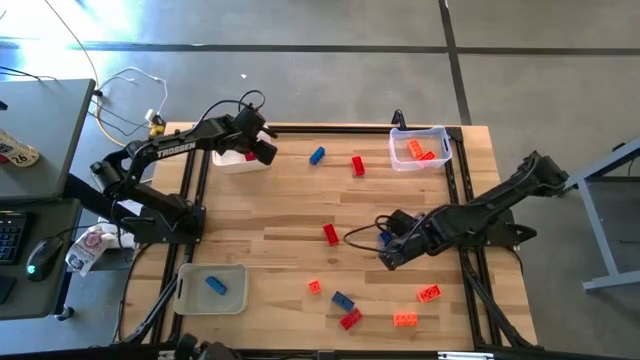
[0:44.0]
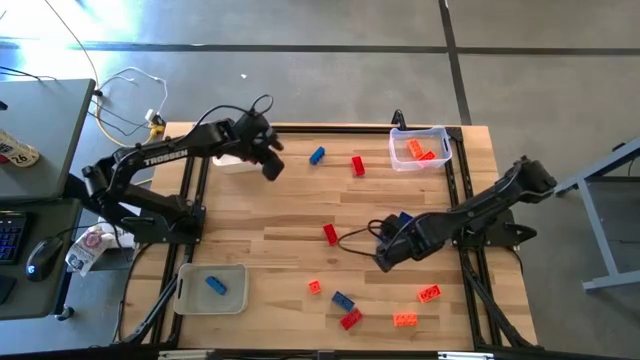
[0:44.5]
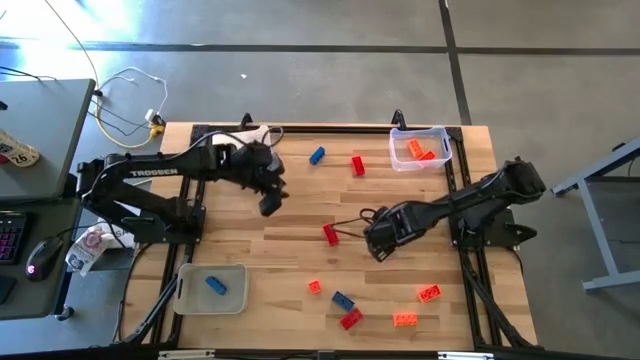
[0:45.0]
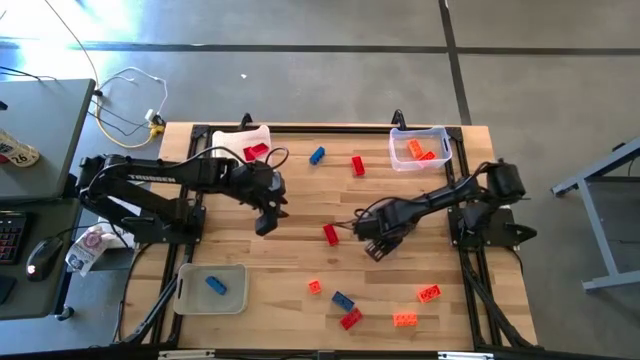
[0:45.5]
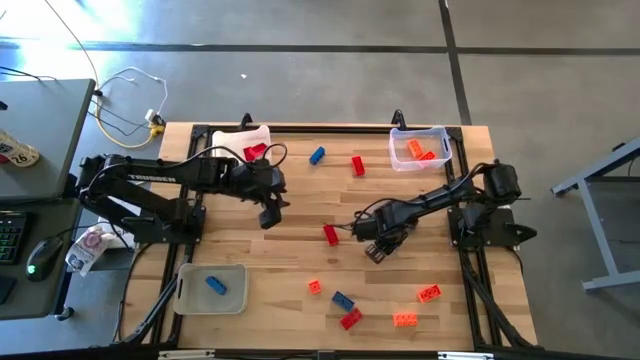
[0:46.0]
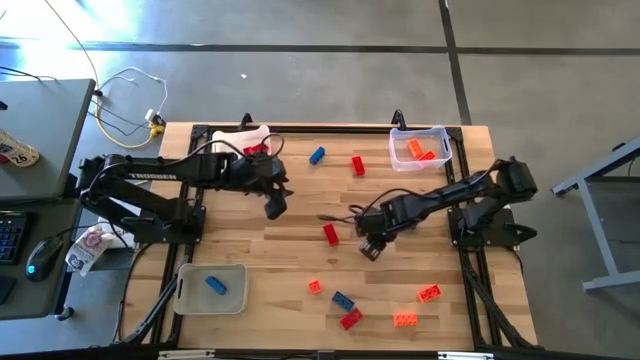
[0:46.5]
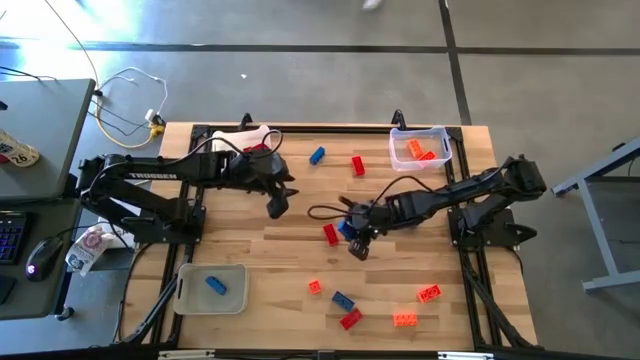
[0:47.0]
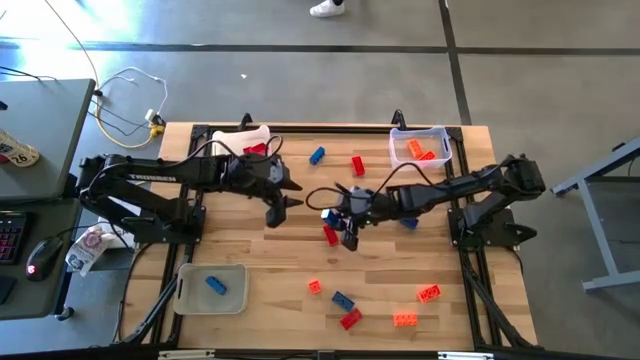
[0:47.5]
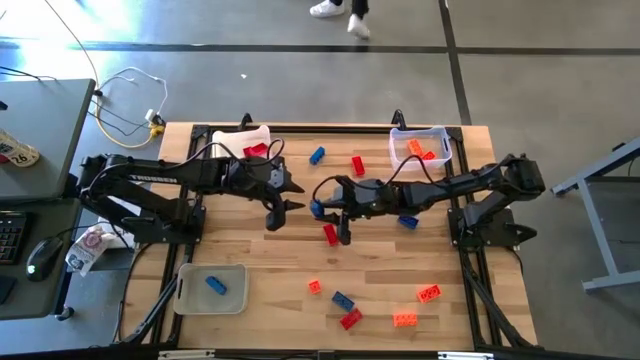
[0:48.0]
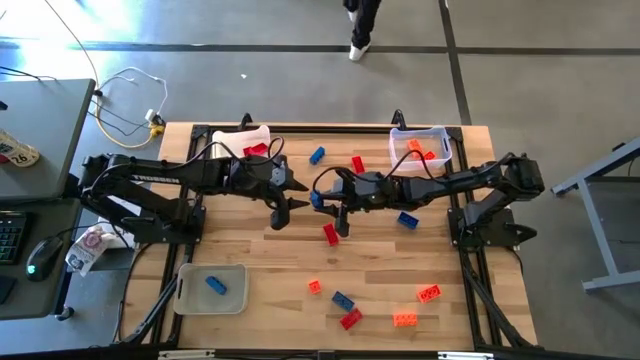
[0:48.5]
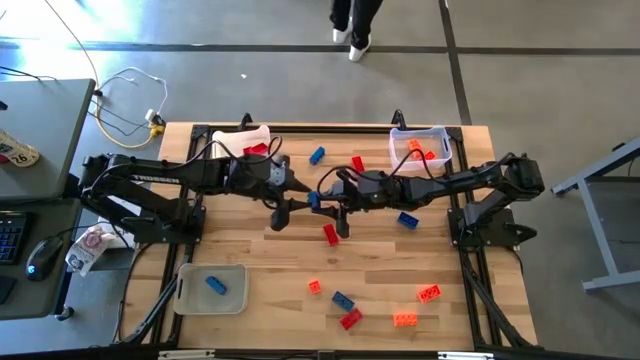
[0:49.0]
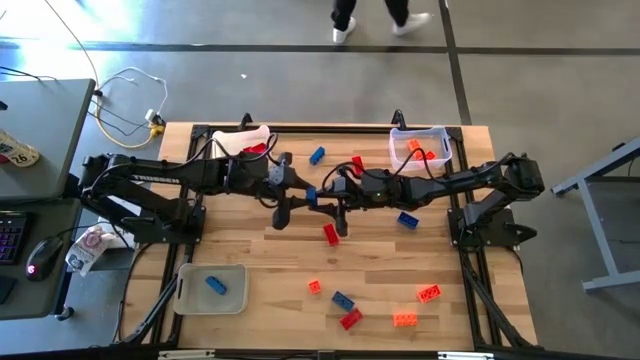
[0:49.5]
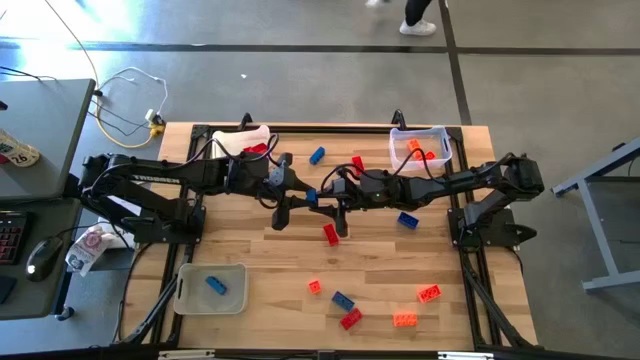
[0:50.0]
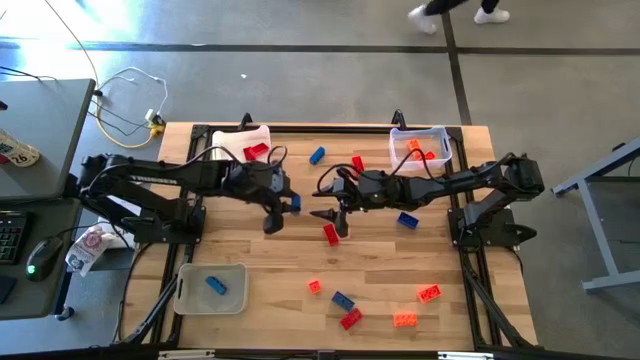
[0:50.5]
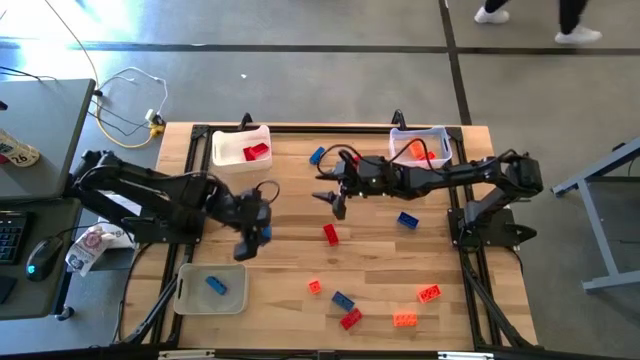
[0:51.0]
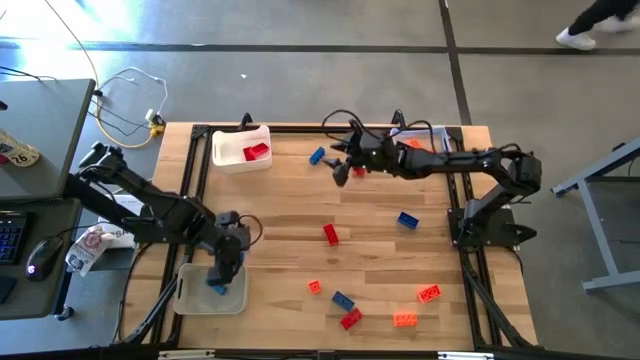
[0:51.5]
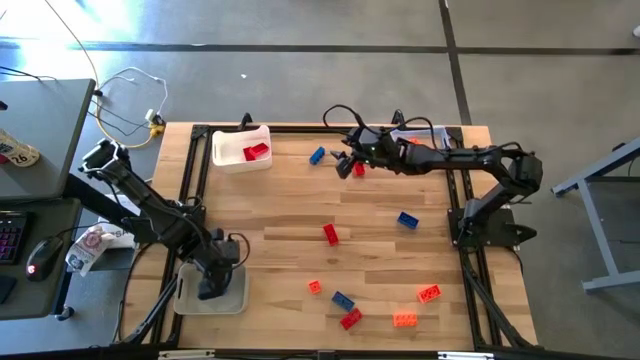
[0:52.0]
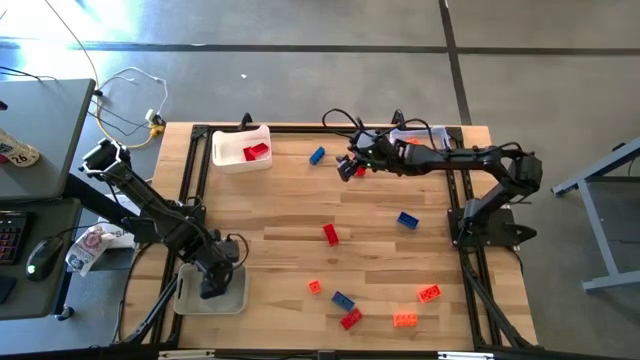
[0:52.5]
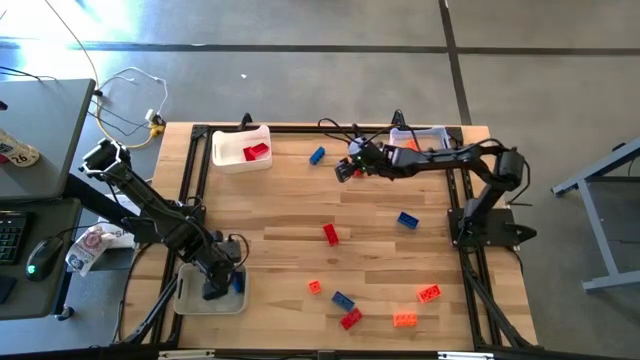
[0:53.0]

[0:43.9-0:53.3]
Task: Sort & place blocks by color
Put the blue game piece into the gray bin

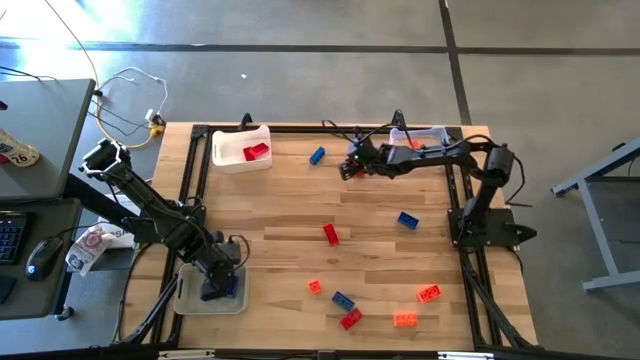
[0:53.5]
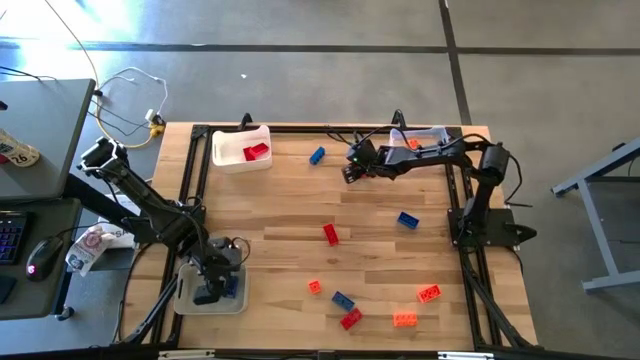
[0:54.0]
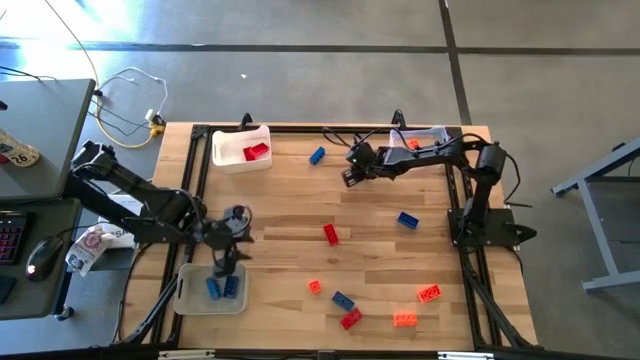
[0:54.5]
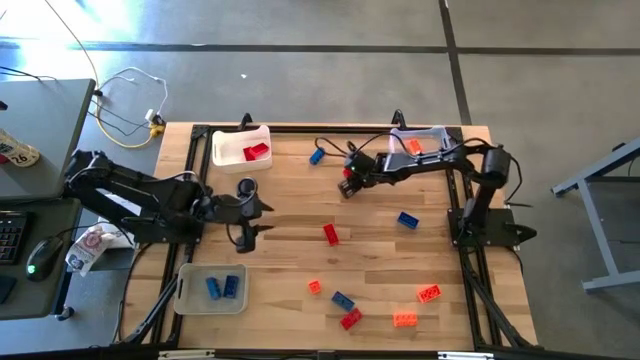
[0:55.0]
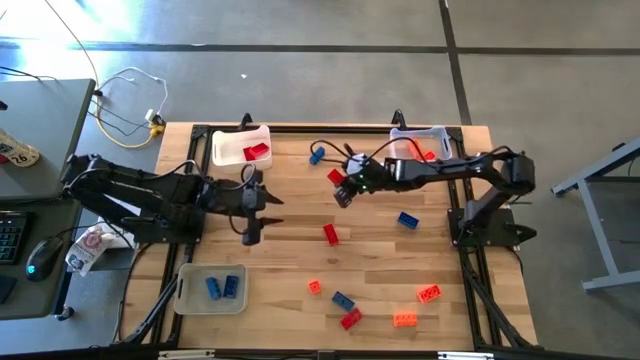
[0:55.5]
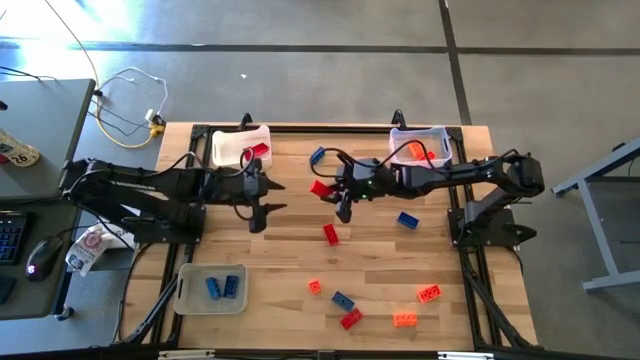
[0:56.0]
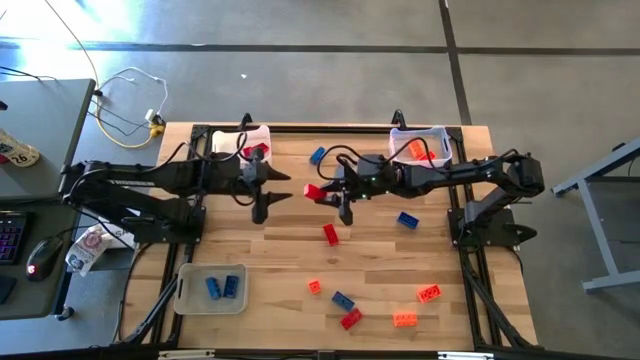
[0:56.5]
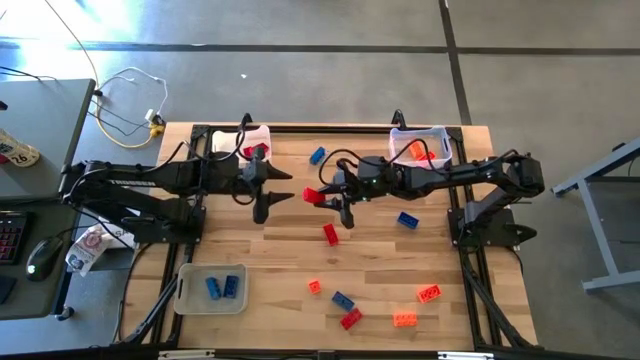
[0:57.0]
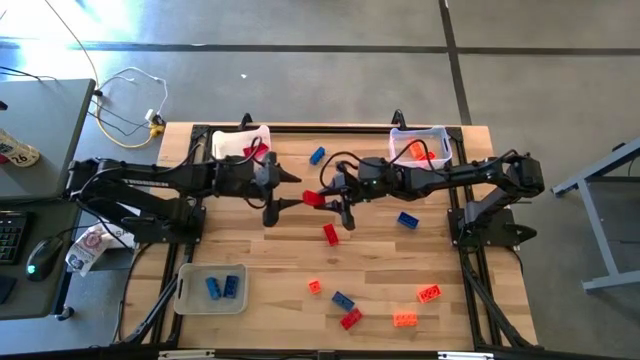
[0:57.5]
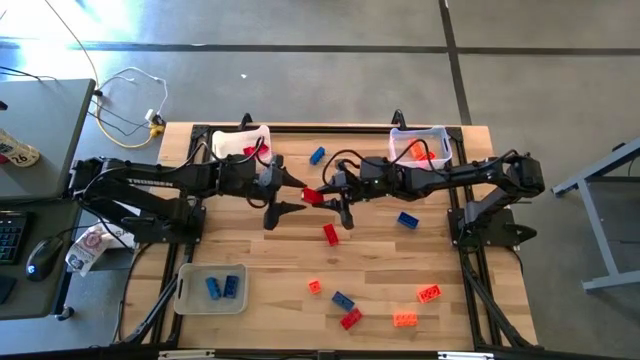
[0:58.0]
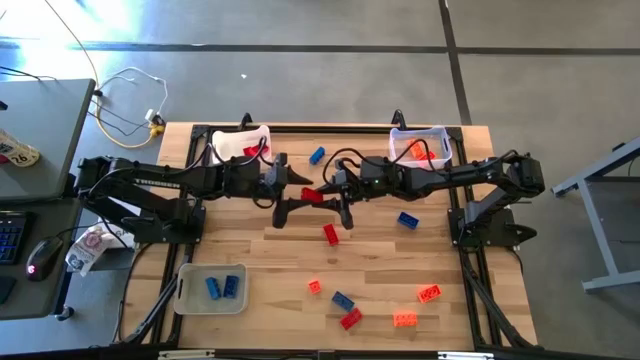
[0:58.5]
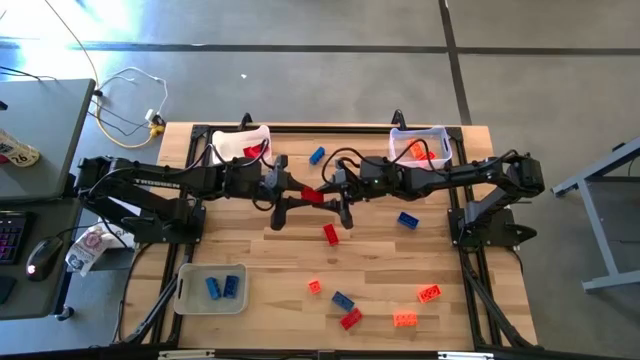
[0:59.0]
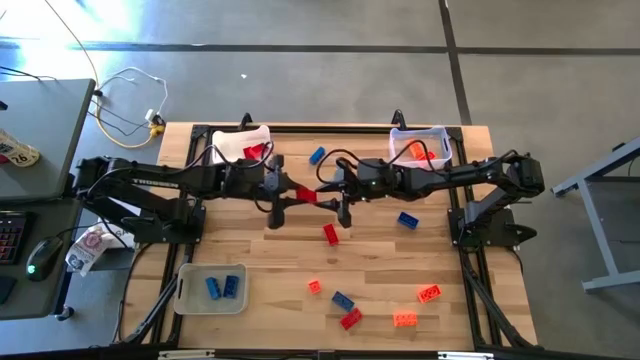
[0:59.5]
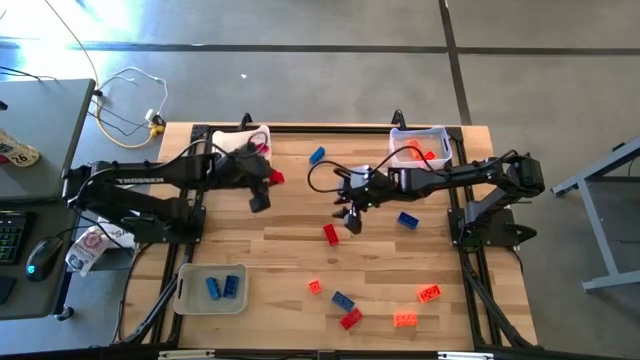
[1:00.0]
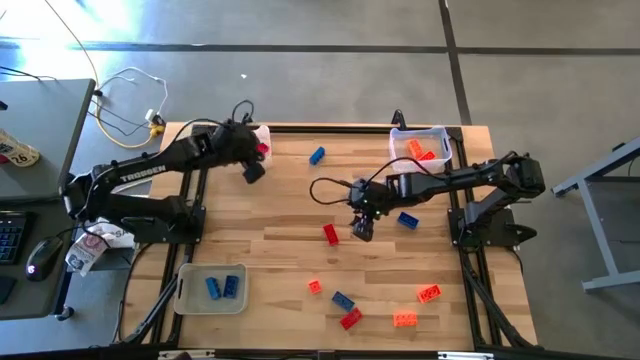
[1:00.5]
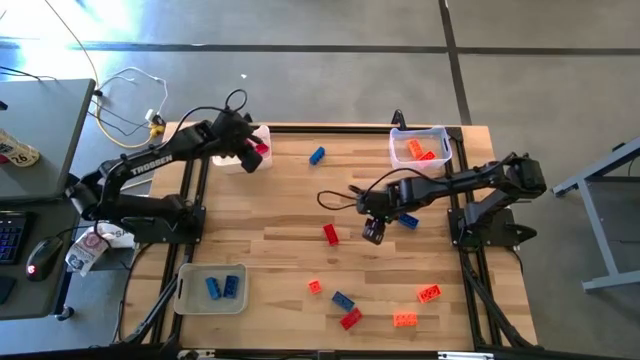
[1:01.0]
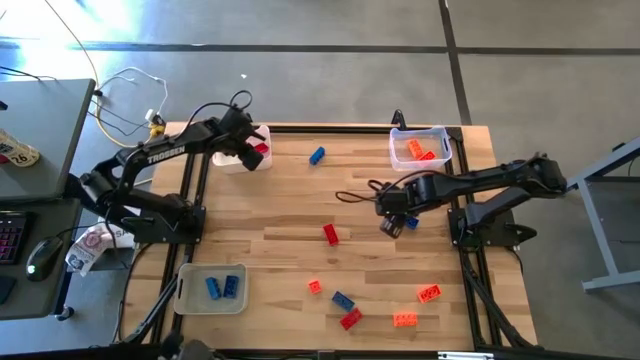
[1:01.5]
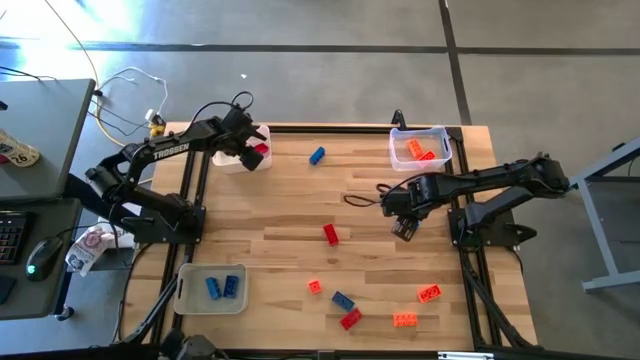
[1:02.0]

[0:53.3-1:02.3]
Put the red game piece into the white bin

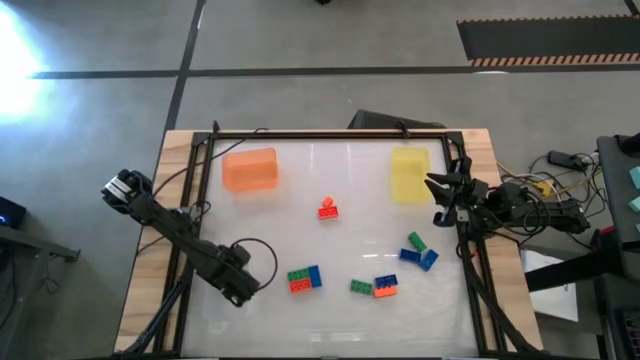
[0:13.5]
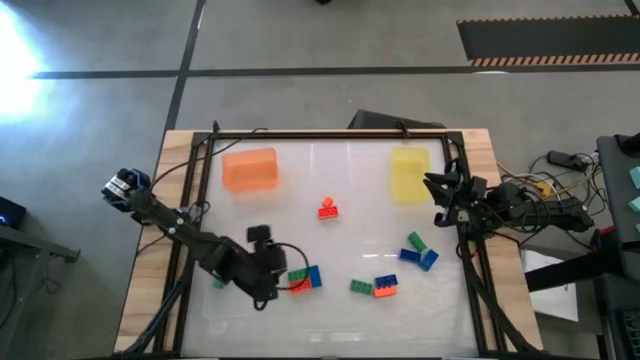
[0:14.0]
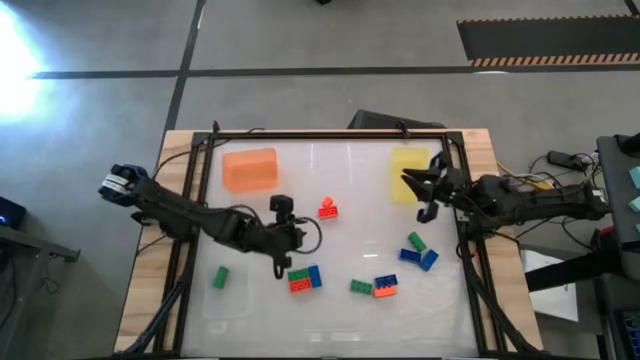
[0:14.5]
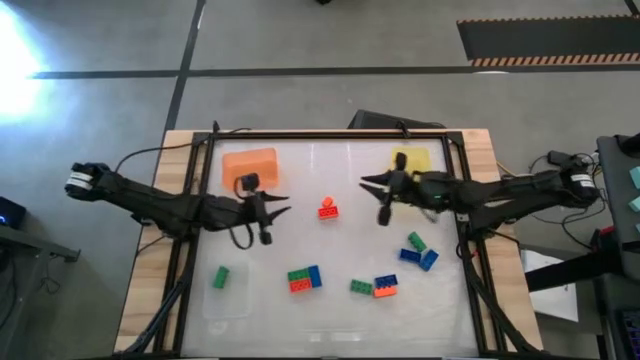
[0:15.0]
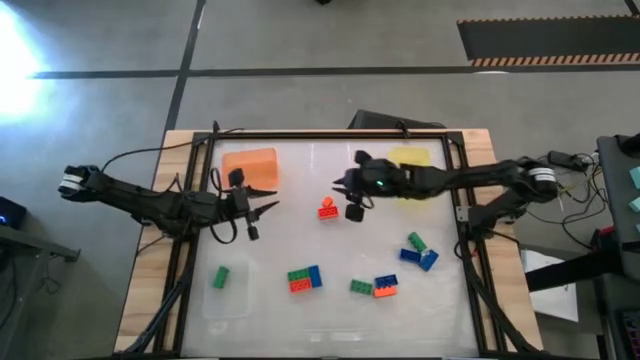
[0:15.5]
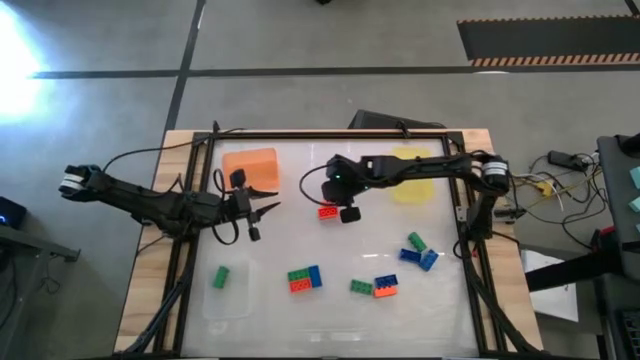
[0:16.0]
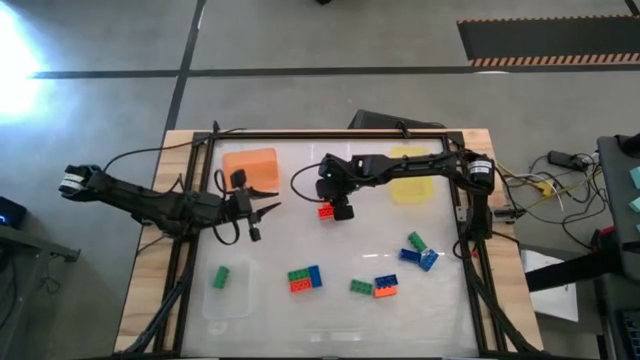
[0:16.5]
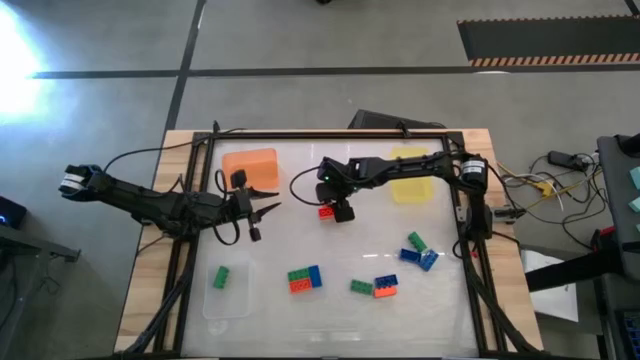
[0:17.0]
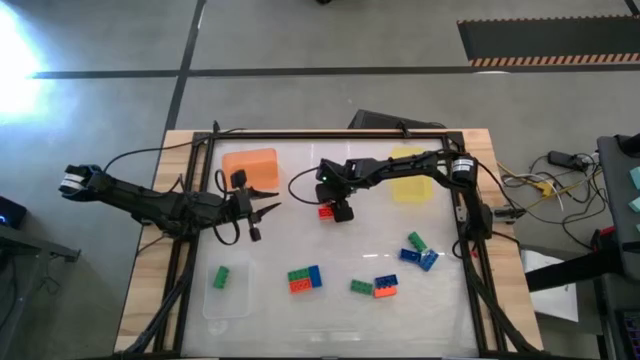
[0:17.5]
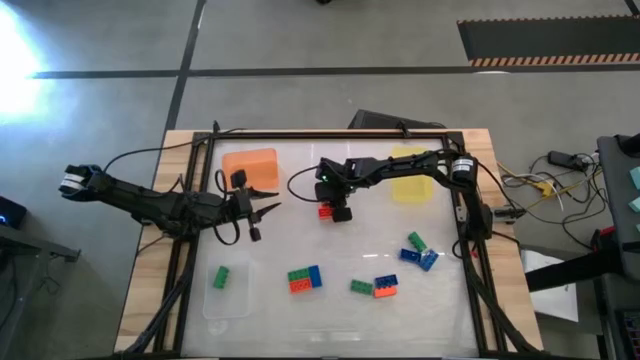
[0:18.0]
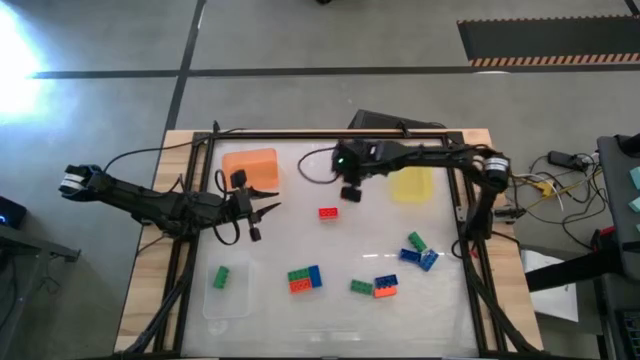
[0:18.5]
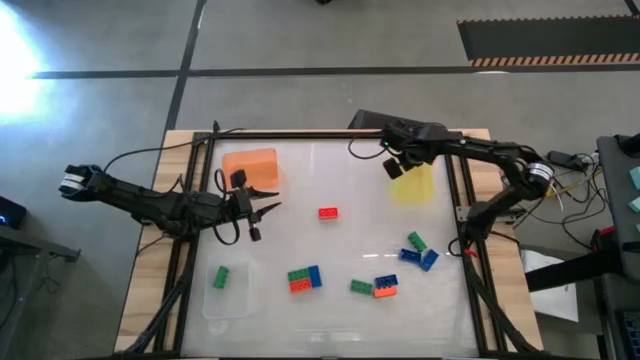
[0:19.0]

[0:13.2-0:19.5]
Task: Sort & place blocks by color
Put the orange game piece into the yellow bin
